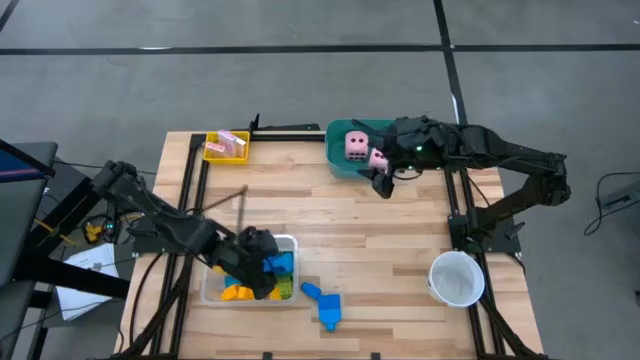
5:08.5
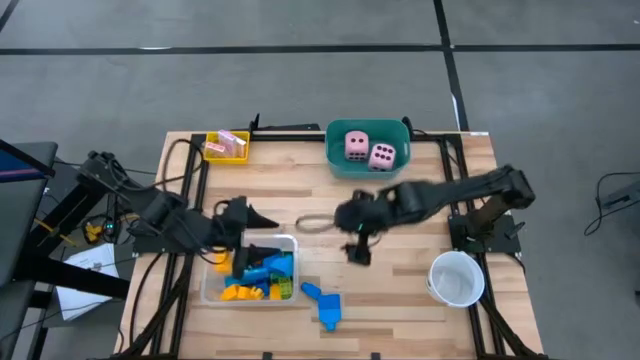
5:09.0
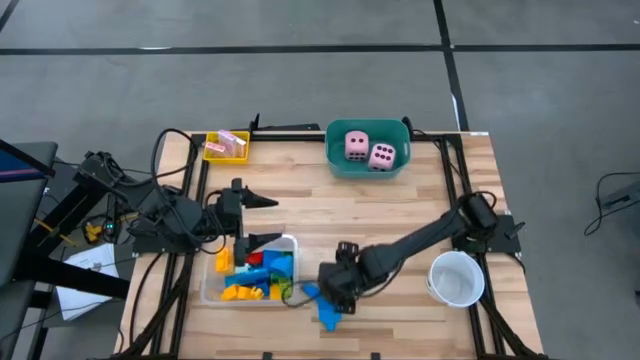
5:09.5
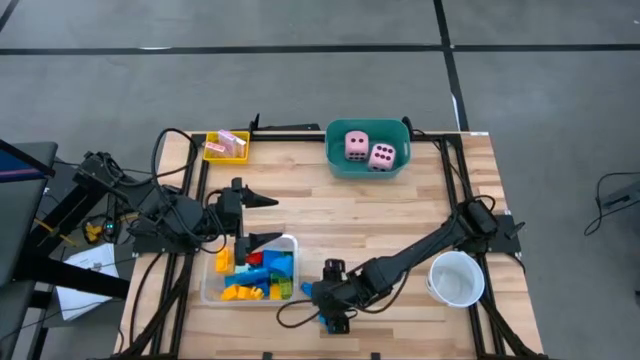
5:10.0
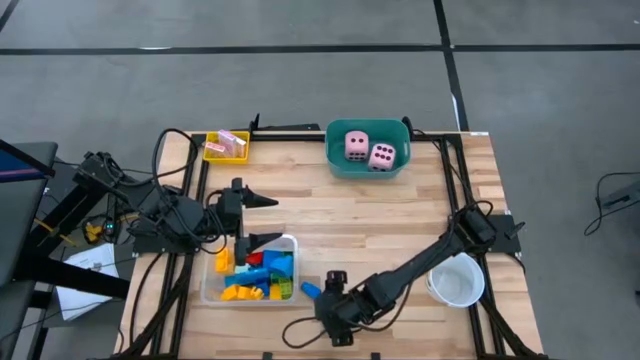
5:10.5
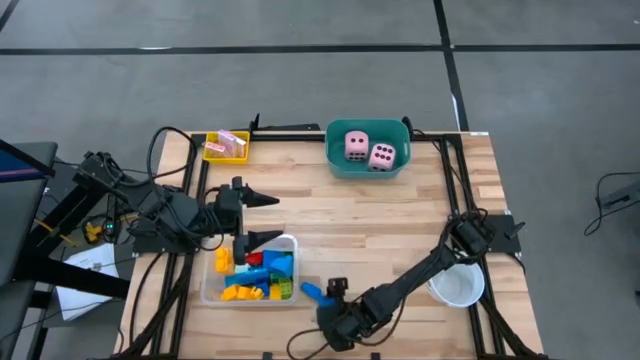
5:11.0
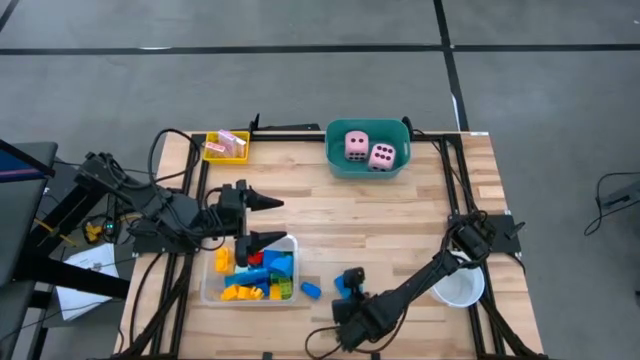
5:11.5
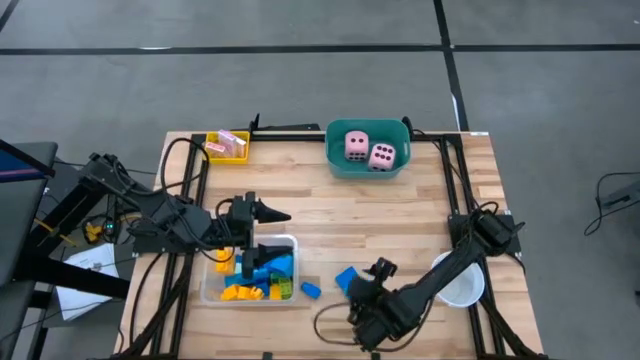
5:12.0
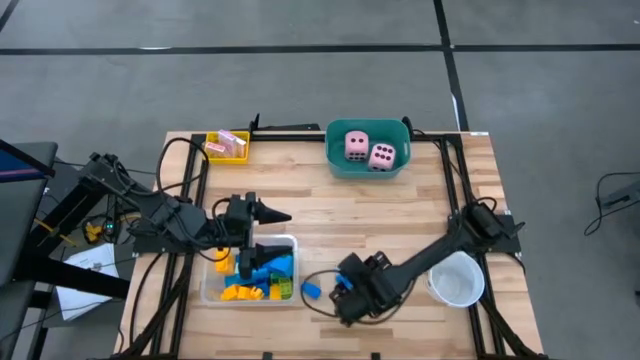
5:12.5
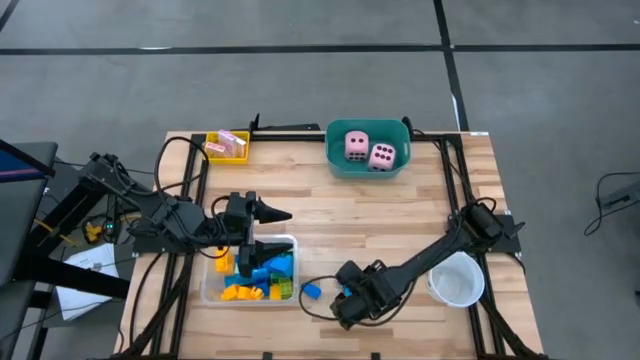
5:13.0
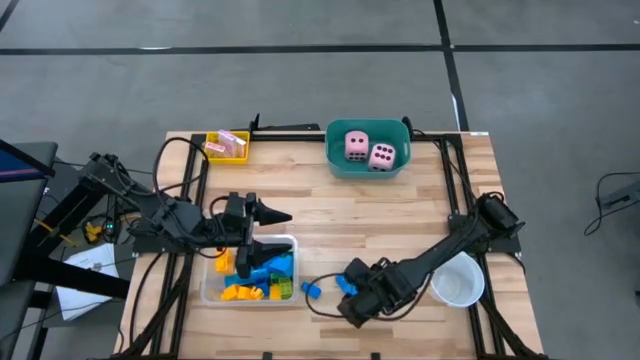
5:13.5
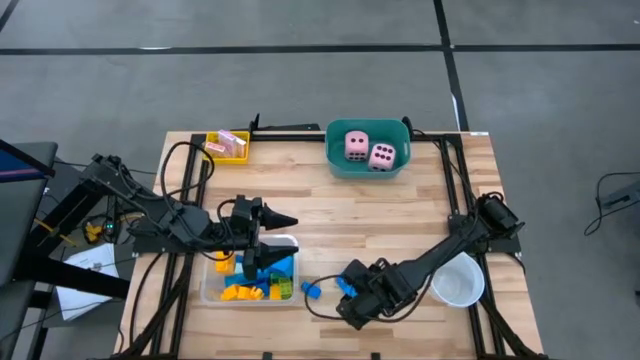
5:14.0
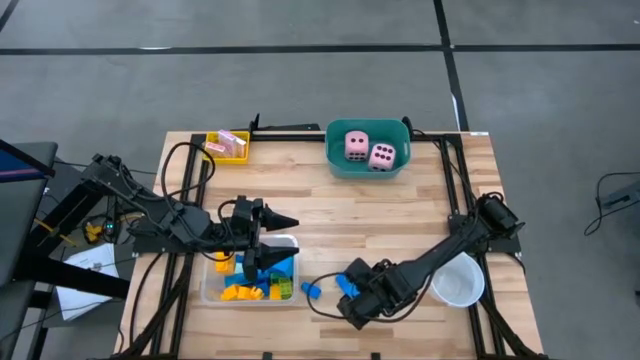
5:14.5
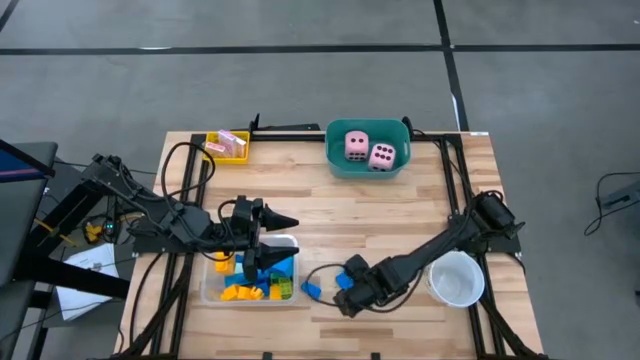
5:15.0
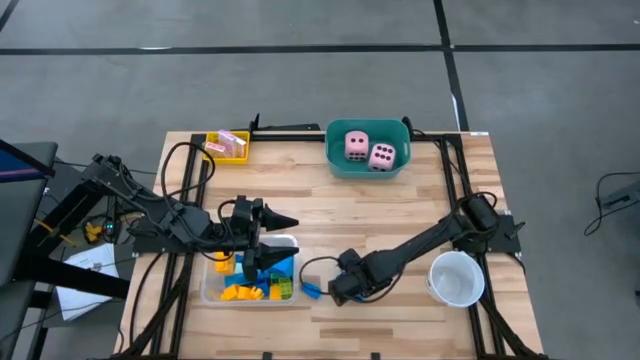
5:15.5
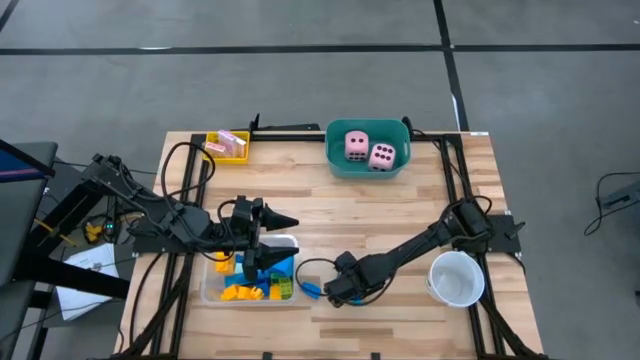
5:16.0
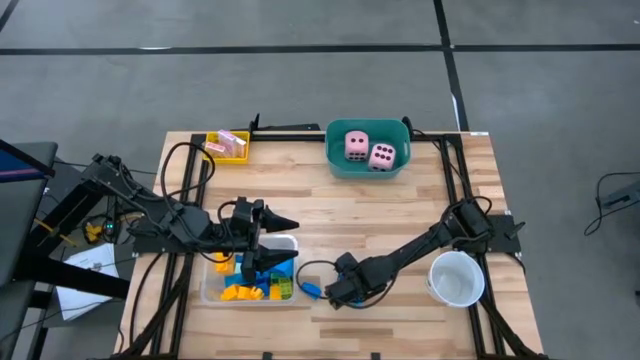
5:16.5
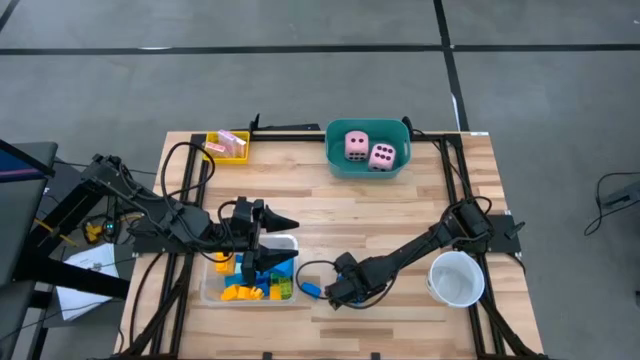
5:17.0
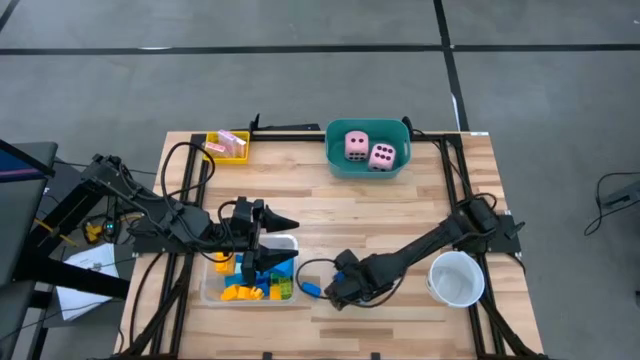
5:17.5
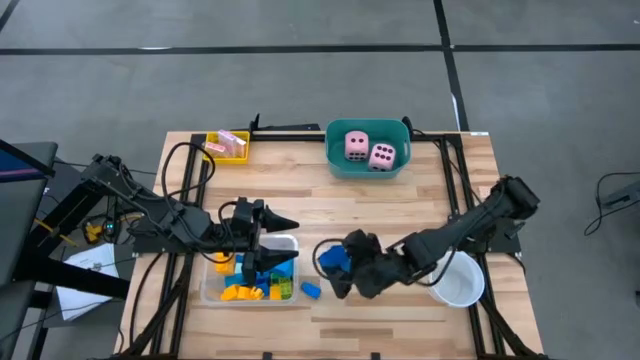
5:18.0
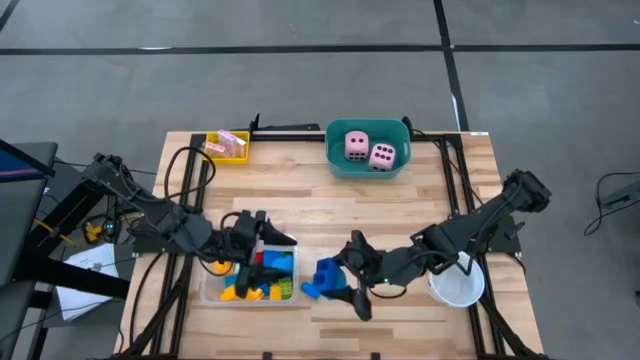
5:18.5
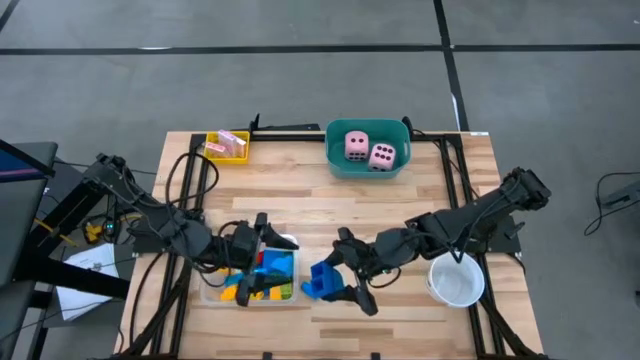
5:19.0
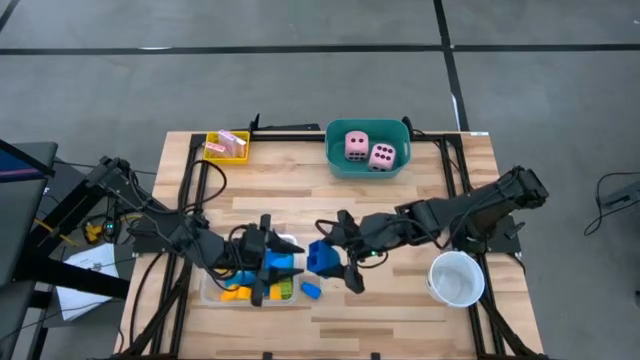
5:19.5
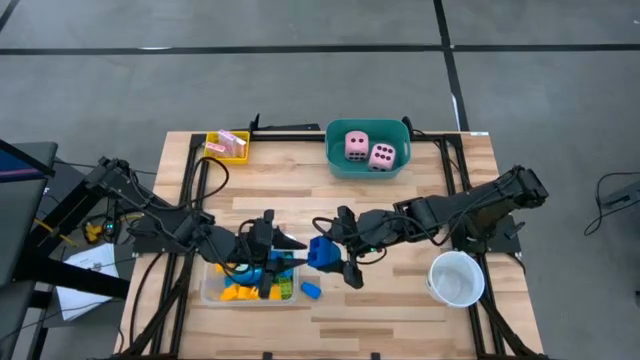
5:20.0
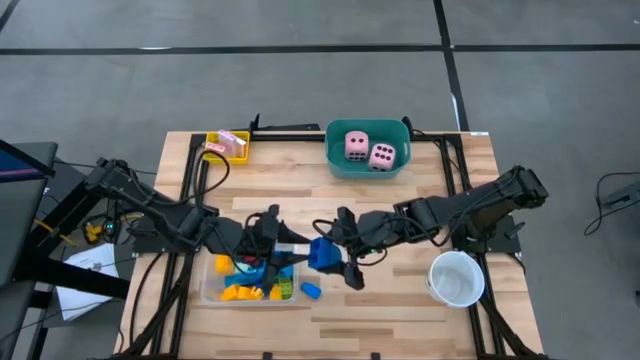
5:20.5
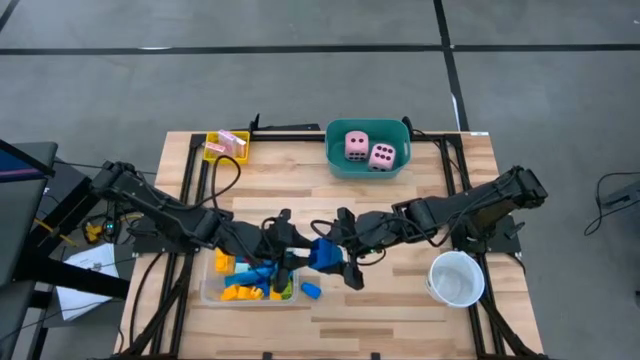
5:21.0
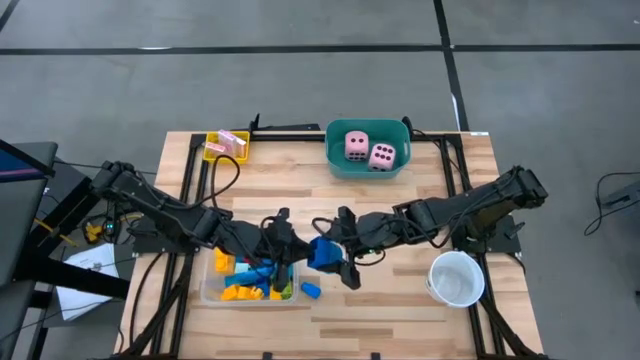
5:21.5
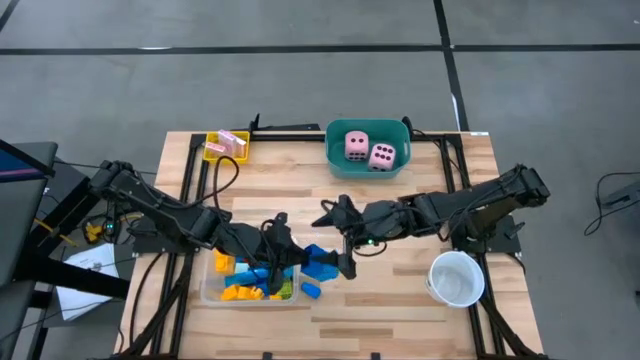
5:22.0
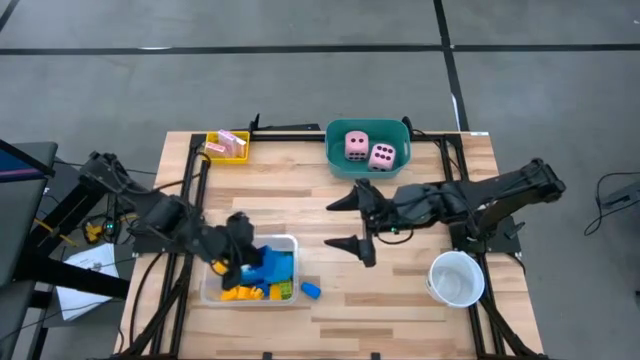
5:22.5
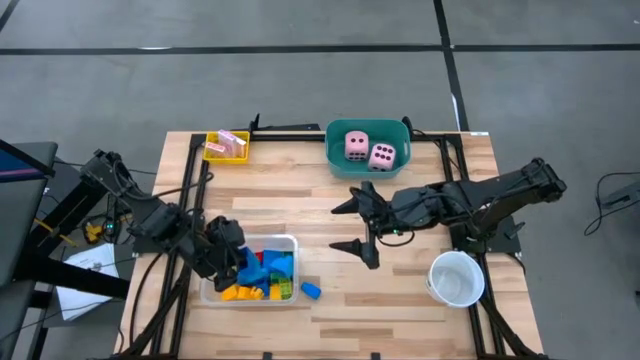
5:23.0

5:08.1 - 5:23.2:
Task: Pick & Place Toys
Put the blue game pieces into the transparent bin

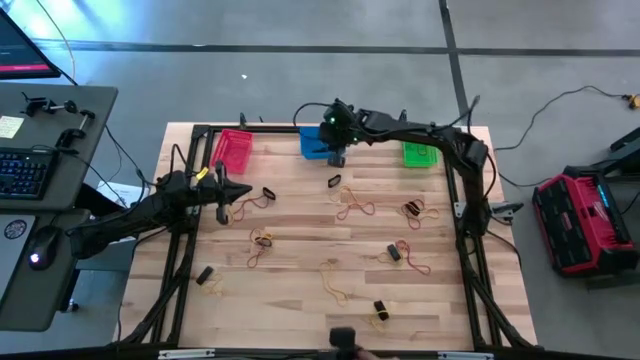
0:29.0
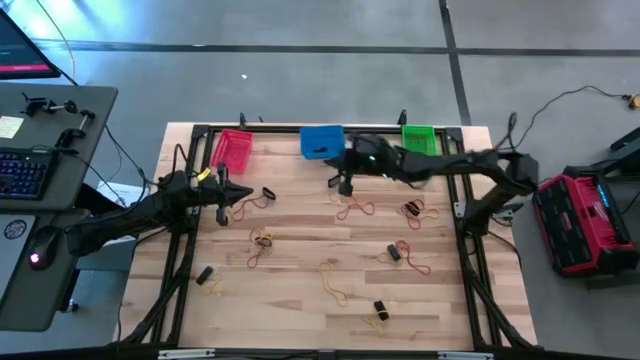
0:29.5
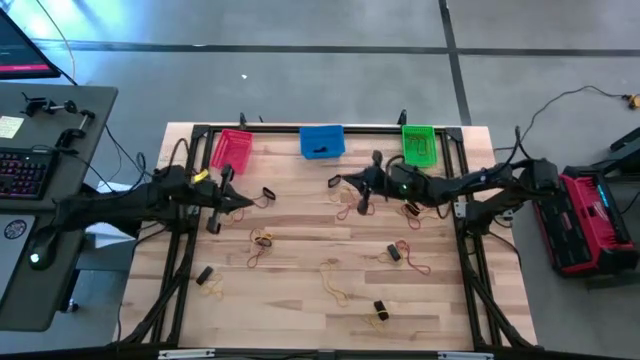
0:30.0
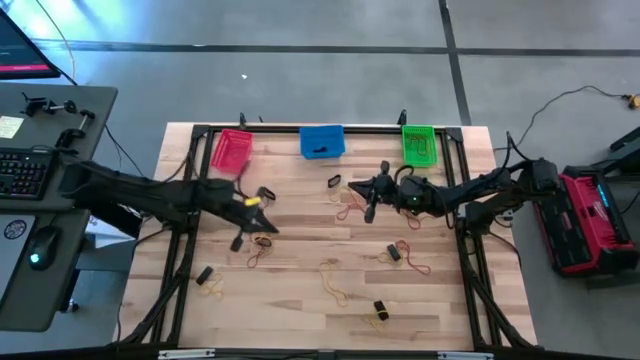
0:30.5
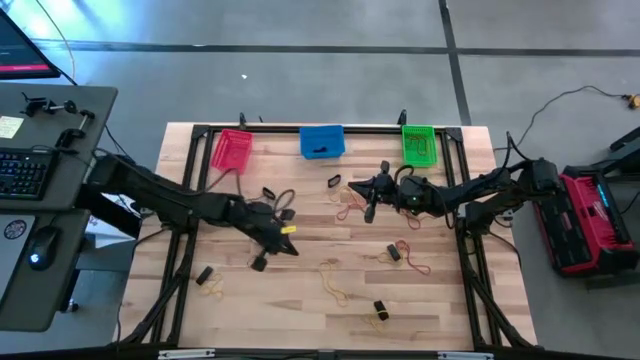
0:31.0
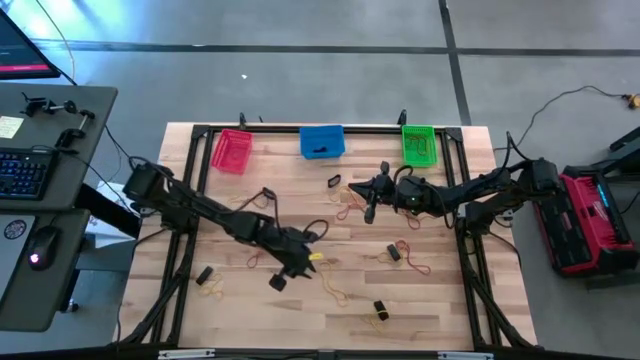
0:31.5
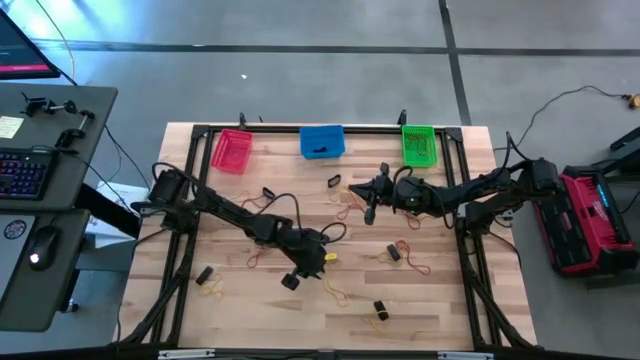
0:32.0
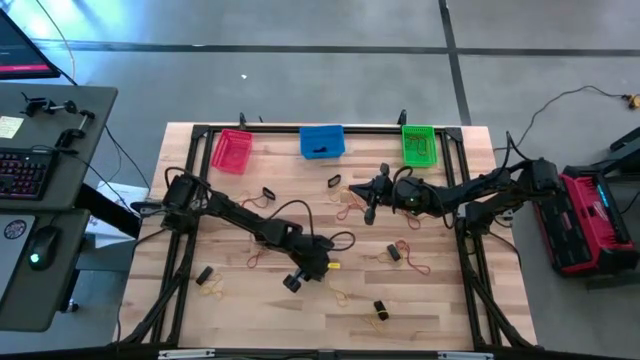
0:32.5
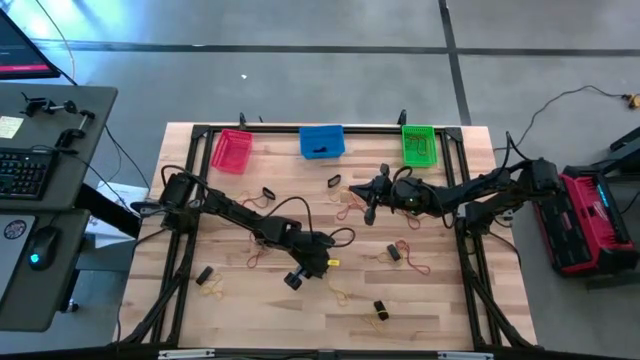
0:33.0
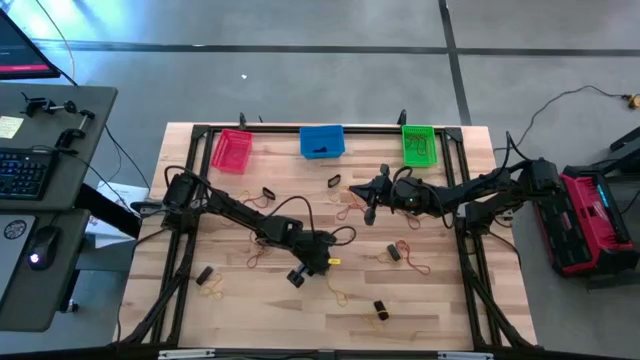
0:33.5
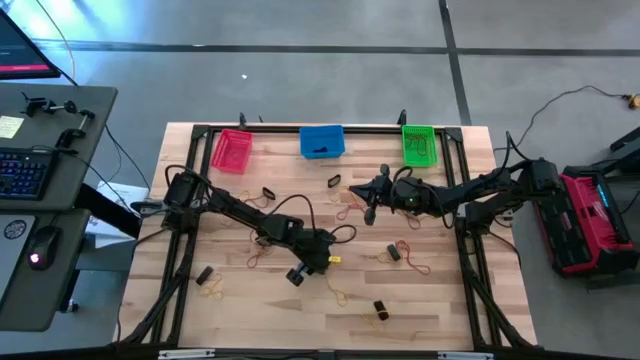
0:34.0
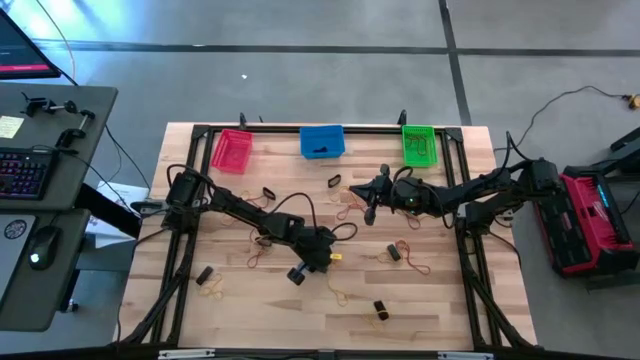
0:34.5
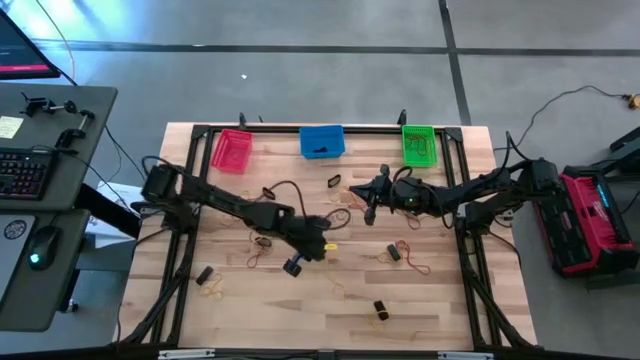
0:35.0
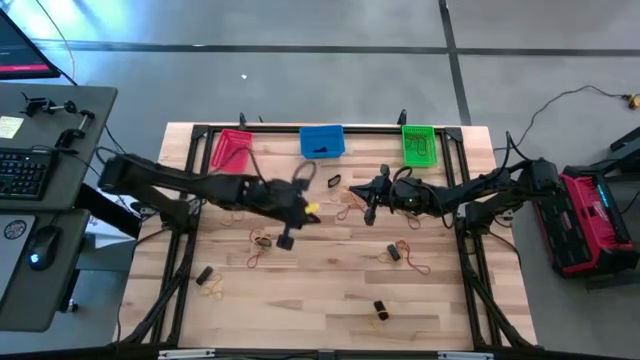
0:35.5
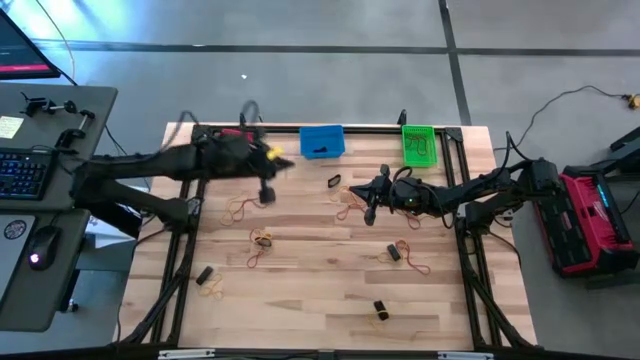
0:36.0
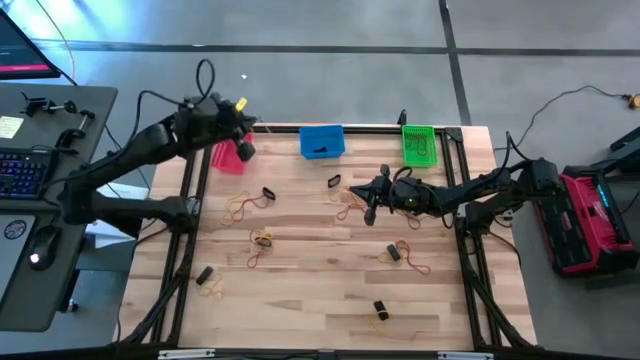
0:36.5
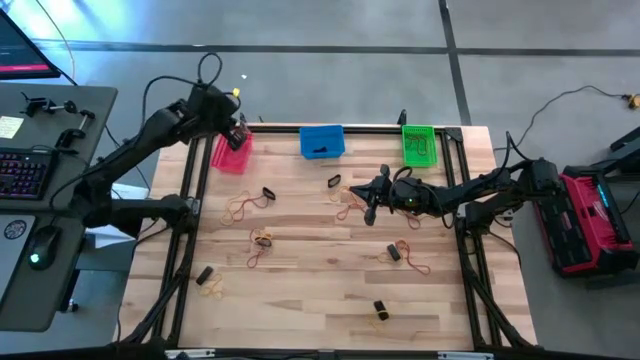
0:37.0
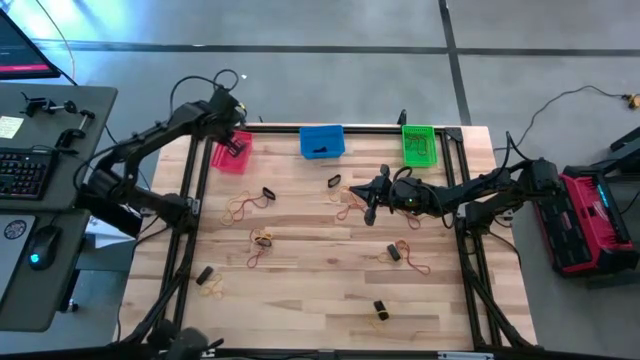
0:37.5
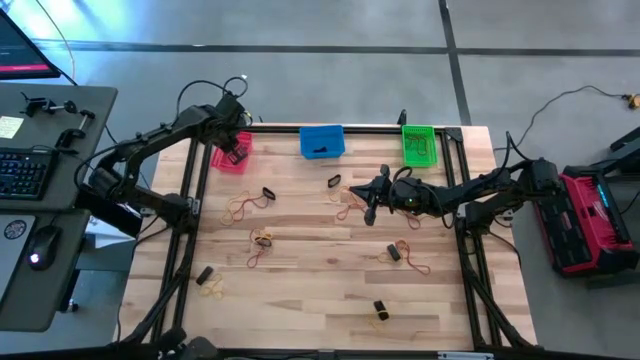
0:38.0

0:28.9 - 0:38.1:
Task: Sort rubber bands into baskets
Put the yellow rubber band into the red bin
